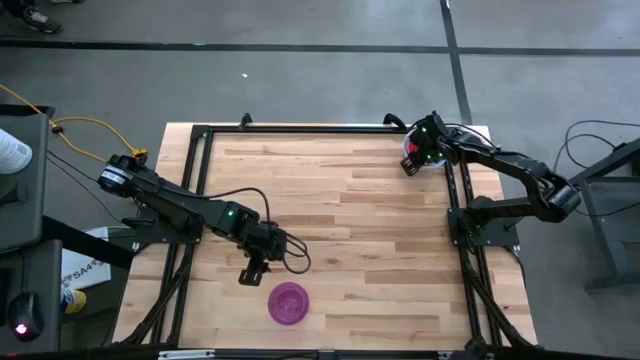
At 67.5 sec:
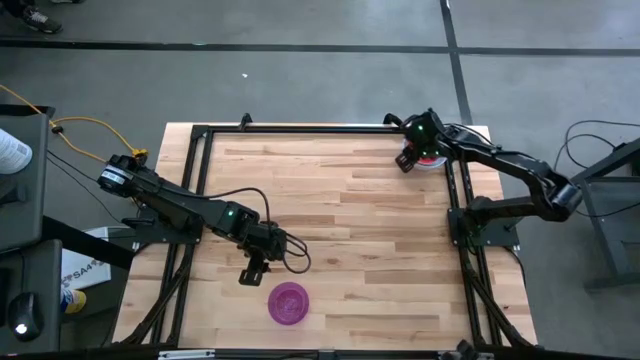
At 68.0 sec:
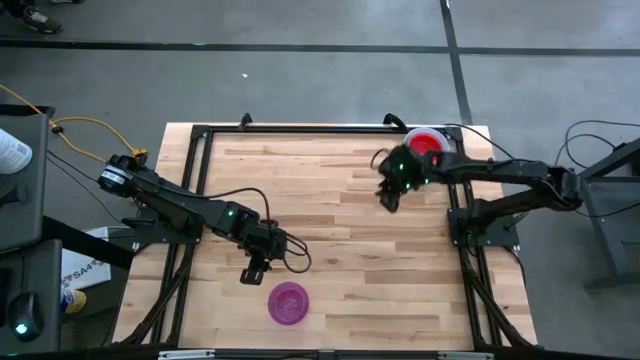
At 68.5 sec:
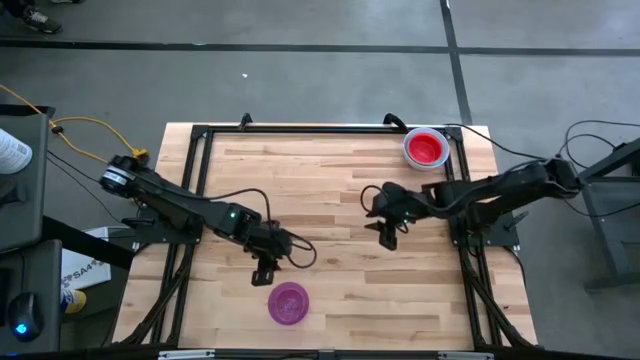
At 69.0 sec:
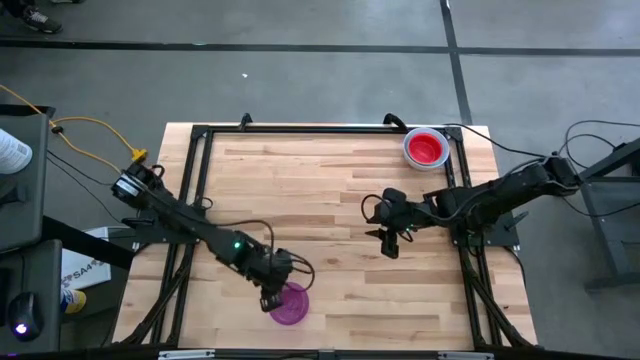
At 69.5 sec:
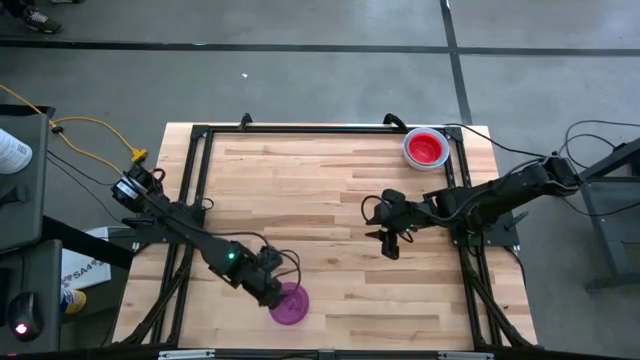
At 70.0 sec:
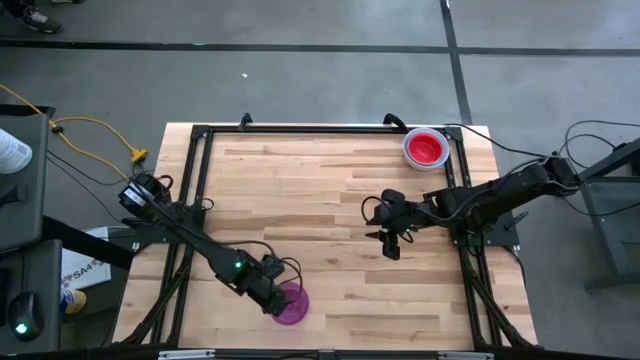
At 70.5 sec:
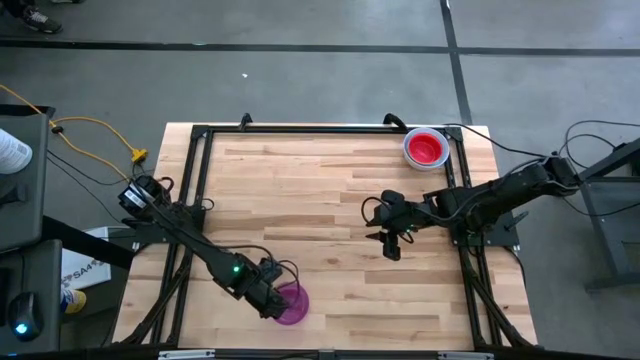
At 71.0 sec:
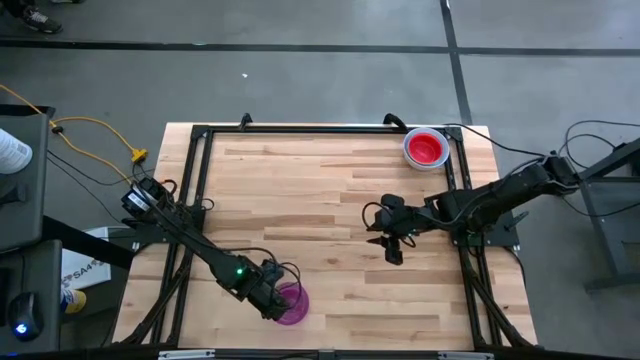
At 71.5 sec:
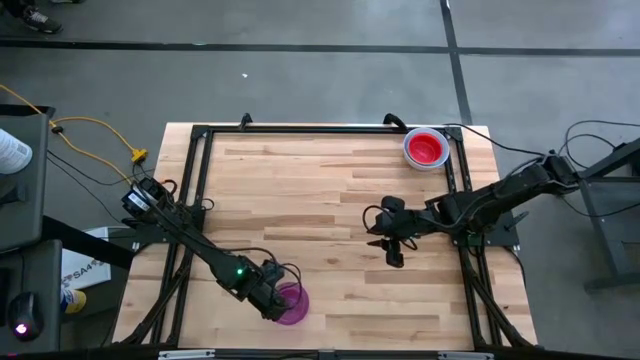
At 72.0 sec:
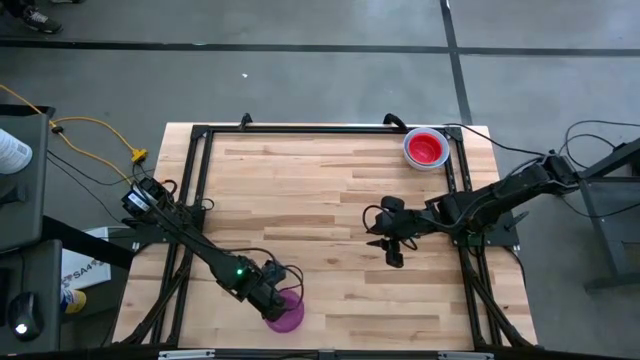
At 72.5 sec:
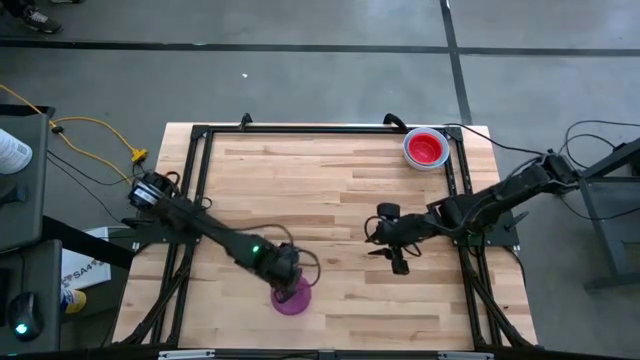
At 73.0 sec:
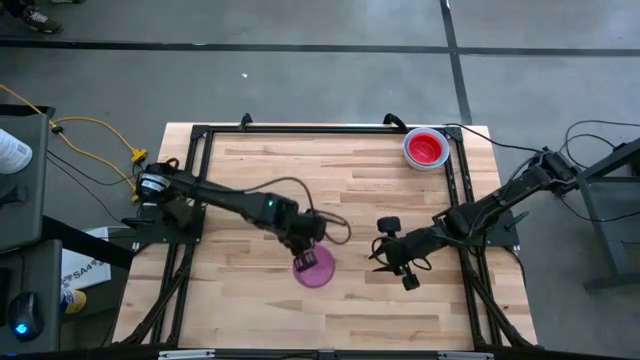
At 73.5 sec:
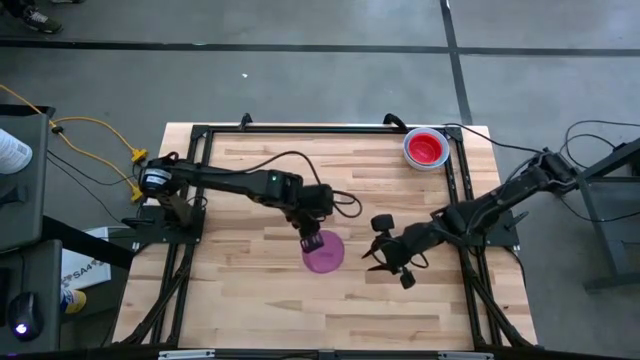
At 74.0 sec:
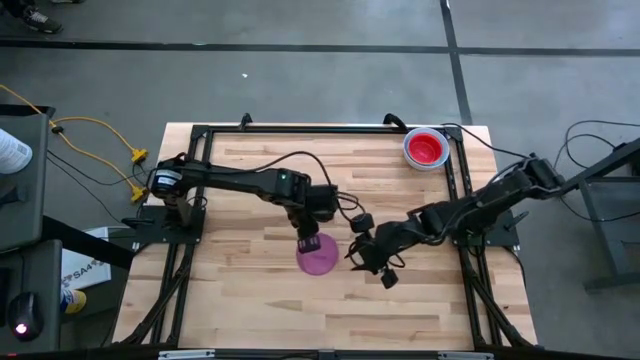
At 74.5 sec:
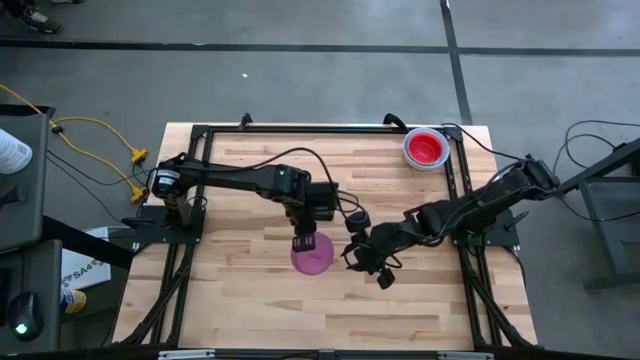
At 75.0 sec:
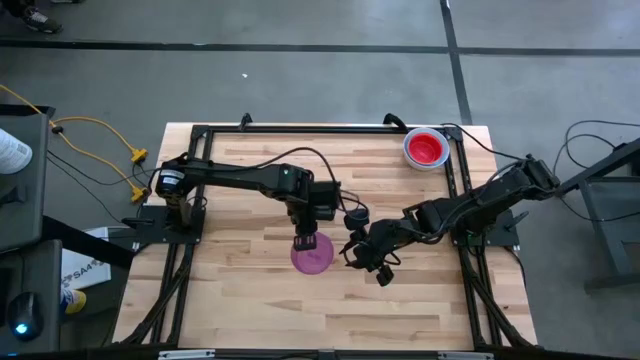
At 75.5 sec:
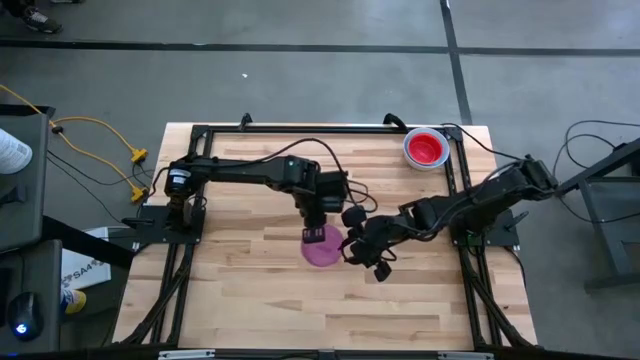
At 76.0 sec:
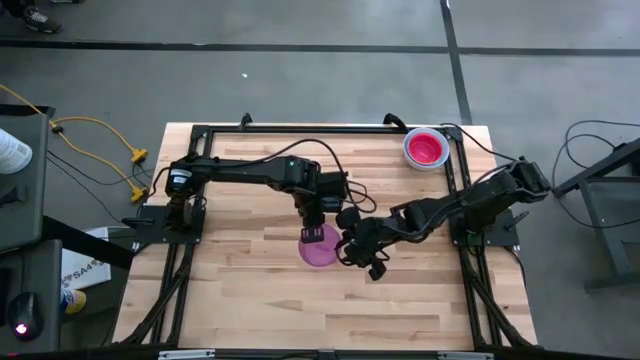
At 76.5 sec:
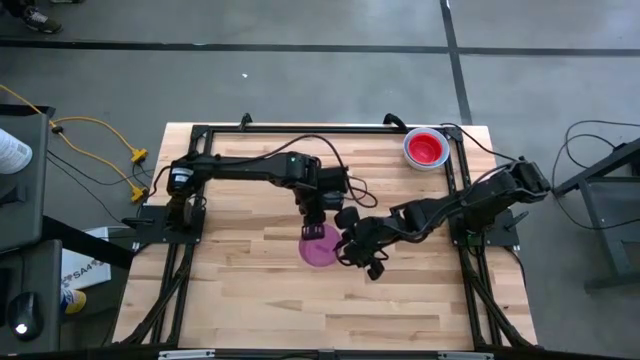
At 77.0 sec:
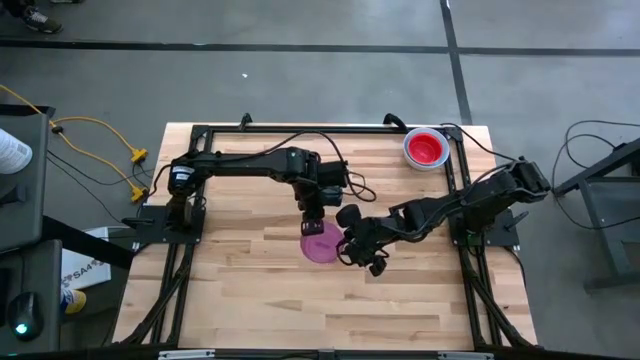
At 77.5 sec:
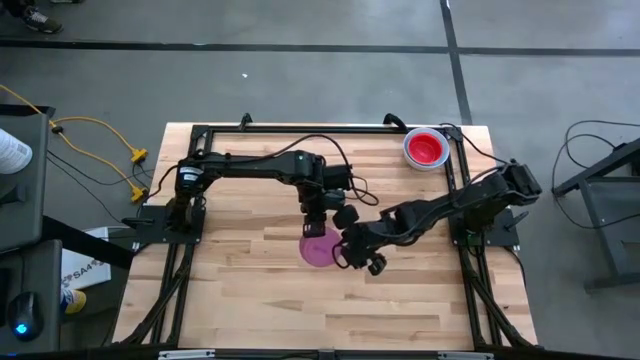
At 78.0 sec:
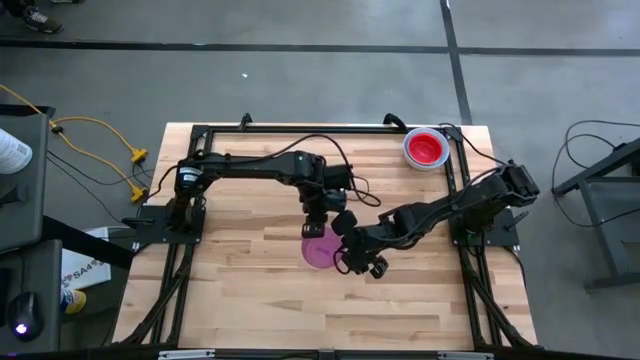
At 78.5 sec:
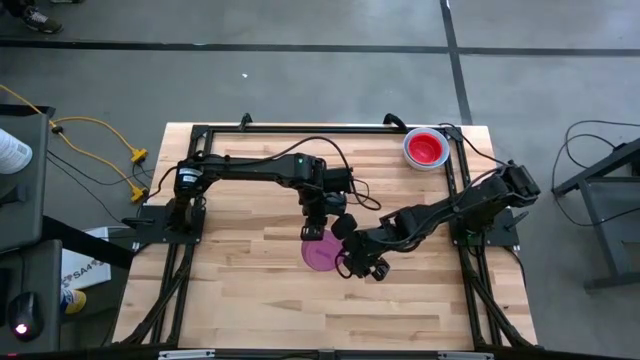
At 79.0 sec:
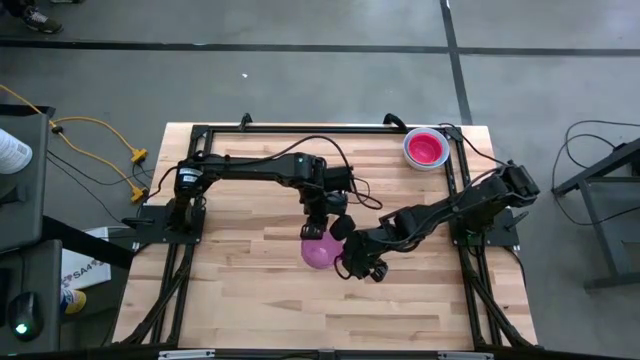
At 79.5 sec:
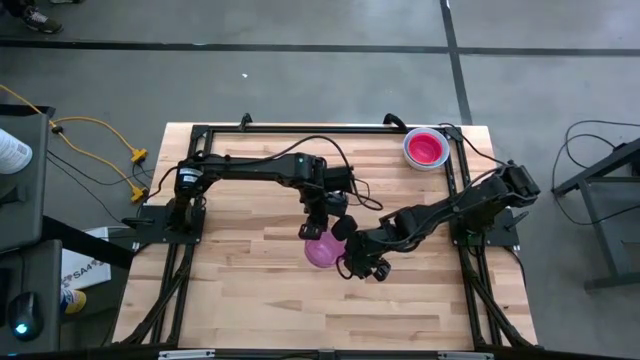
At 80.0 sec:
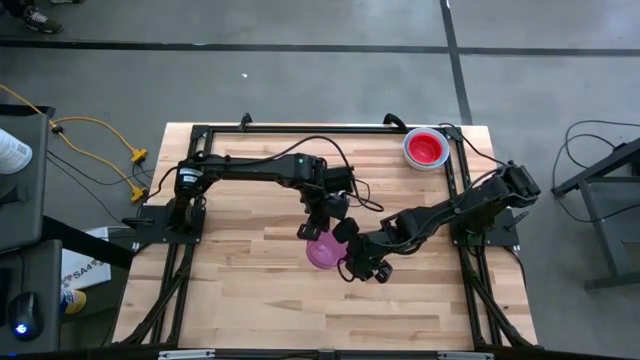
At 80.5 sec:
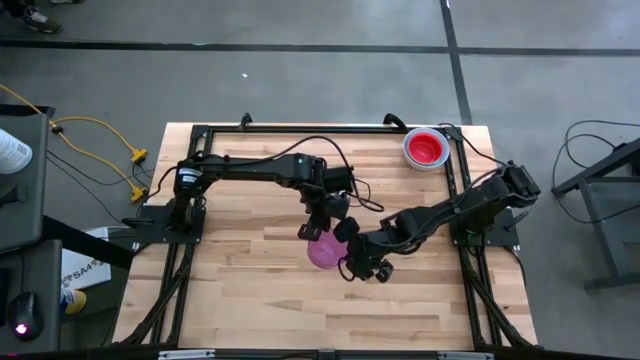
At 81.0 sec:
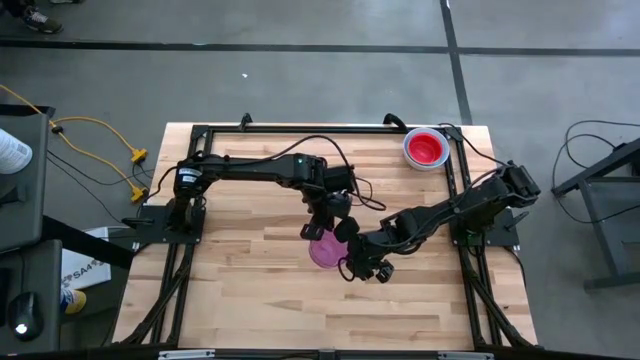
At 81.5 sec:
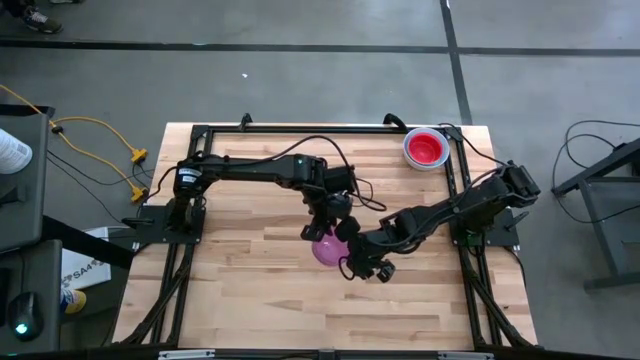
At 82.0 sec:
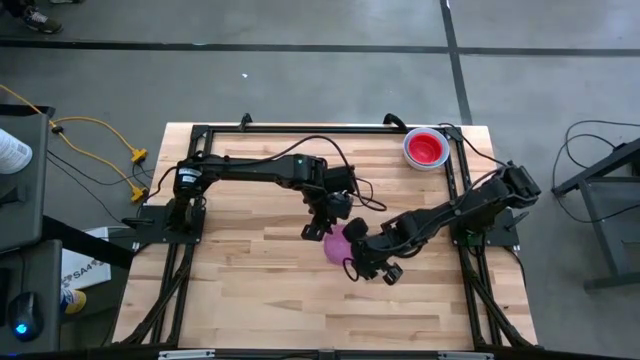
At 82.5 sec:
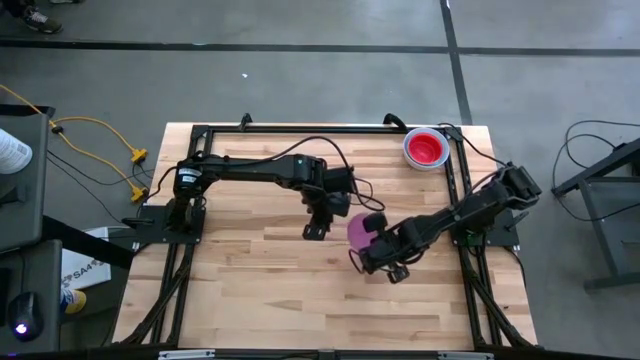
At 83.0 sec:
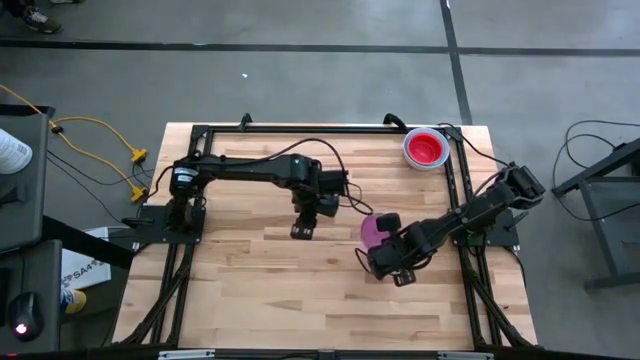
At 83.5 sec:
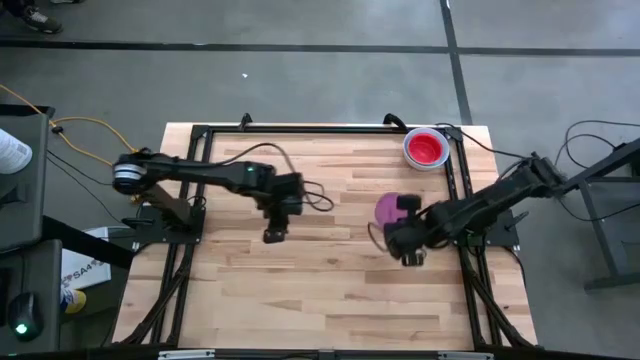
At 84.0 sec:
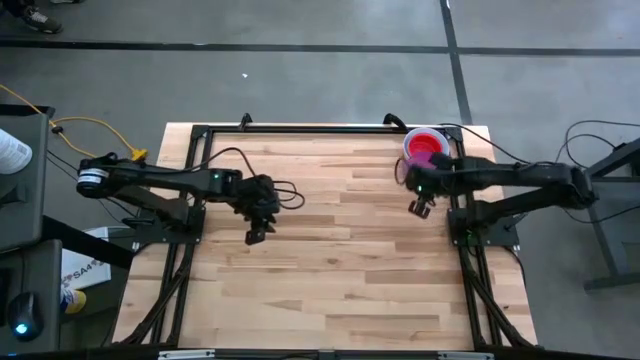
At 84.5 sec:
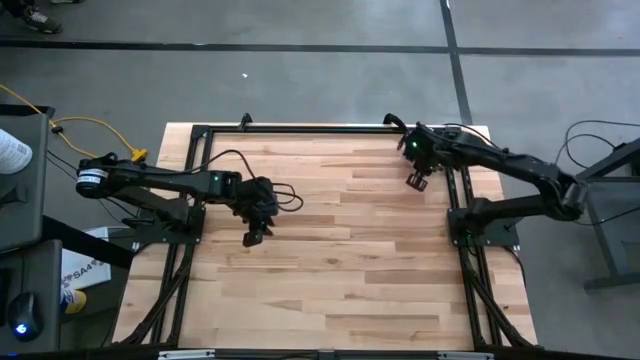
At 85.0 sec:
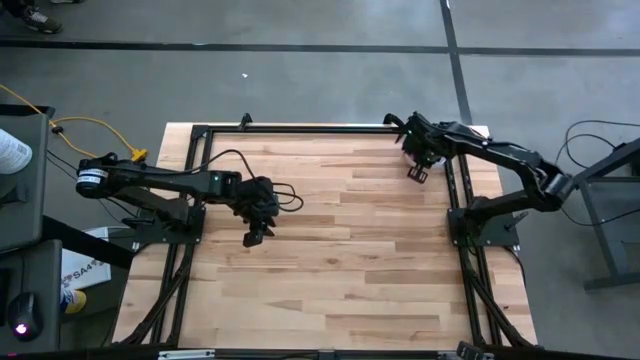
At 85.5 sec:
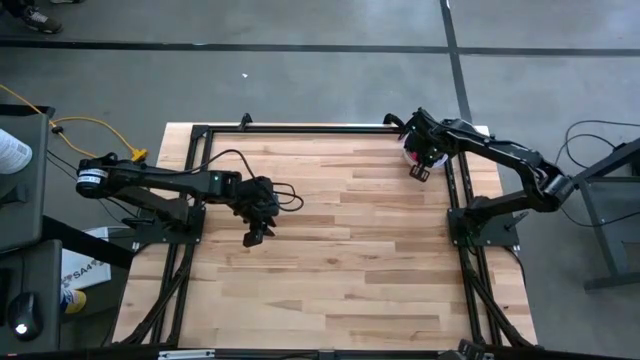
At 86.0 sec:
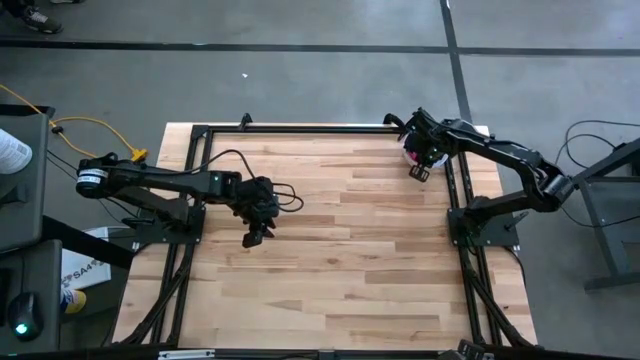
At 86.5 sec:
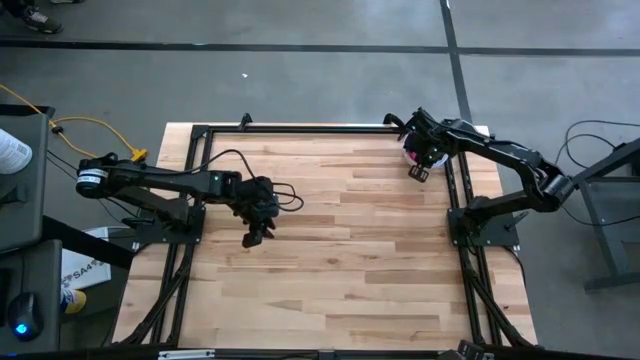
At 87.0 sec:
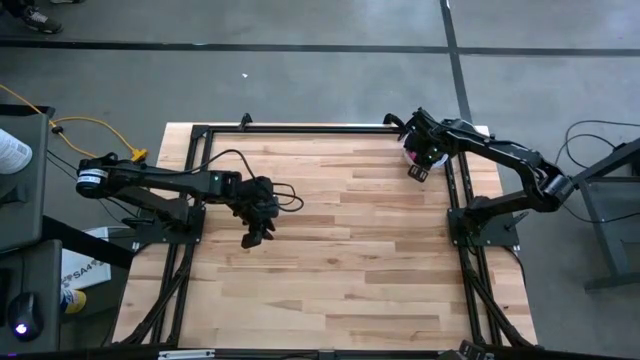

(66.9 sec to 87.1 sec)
Stack the purple bowl on the red bowl
